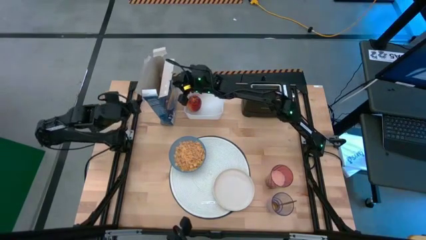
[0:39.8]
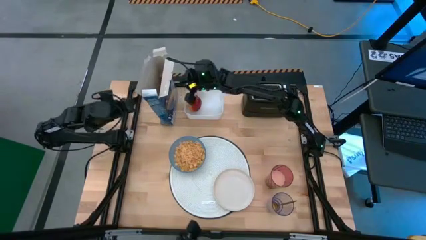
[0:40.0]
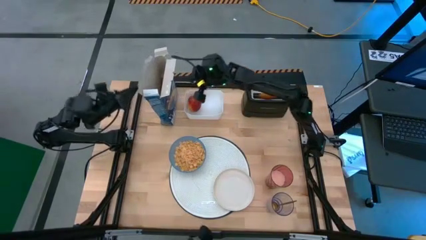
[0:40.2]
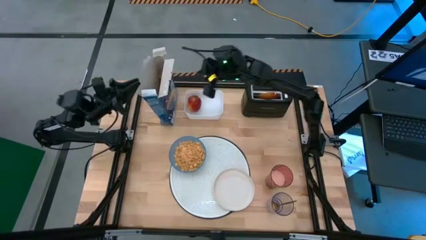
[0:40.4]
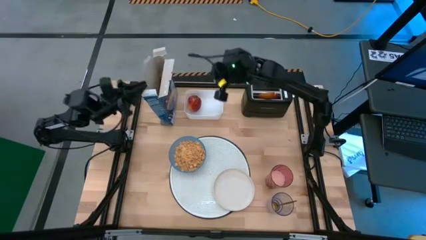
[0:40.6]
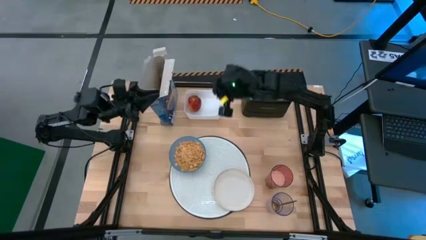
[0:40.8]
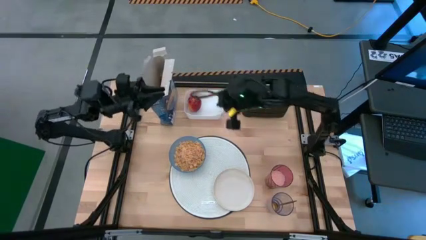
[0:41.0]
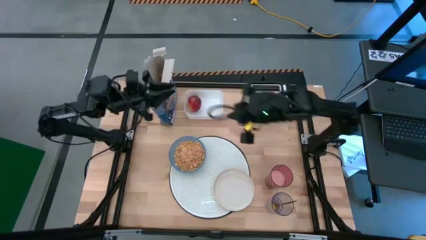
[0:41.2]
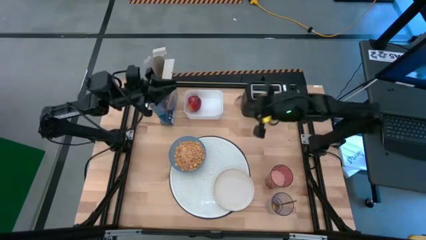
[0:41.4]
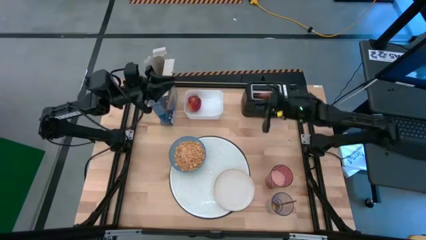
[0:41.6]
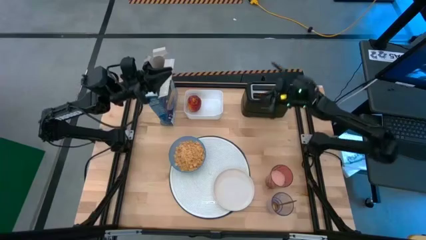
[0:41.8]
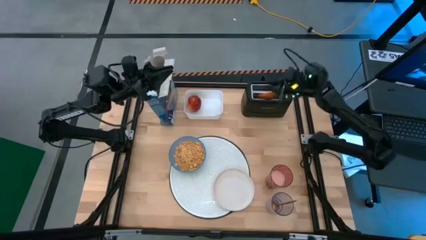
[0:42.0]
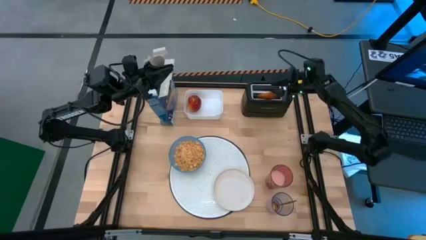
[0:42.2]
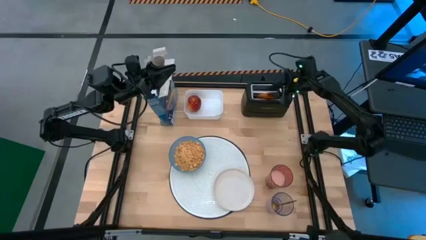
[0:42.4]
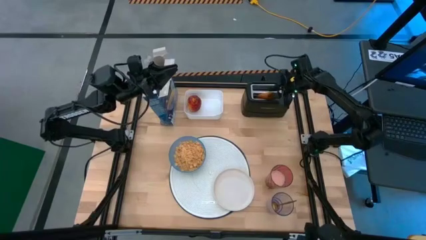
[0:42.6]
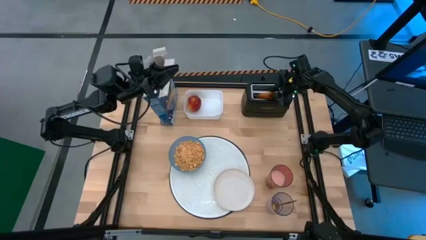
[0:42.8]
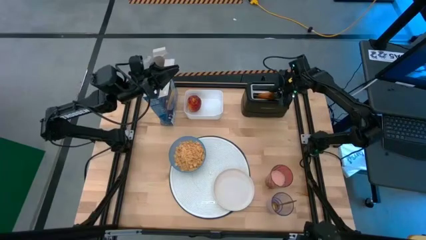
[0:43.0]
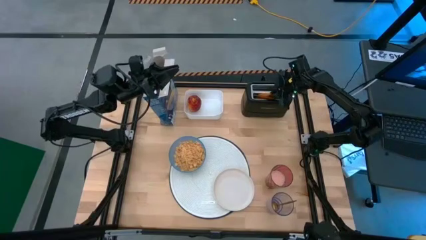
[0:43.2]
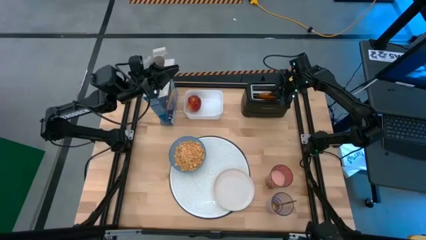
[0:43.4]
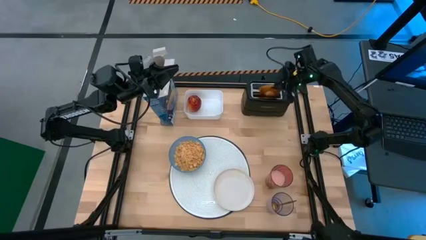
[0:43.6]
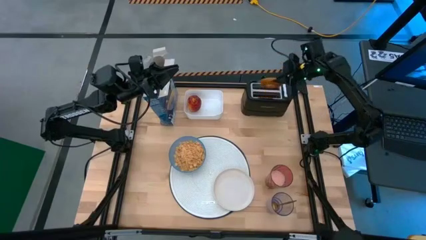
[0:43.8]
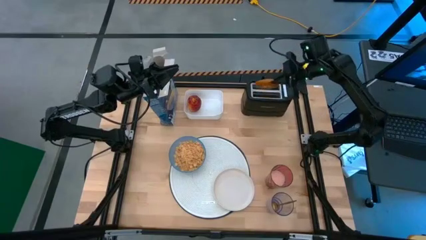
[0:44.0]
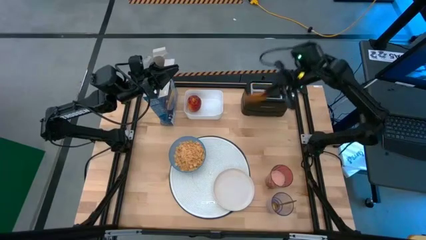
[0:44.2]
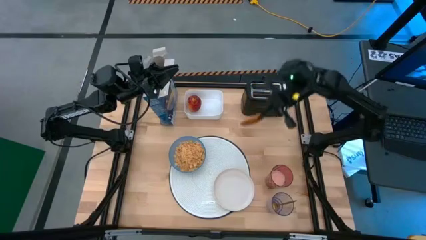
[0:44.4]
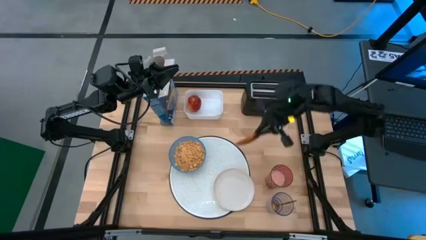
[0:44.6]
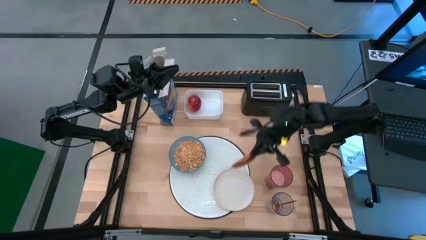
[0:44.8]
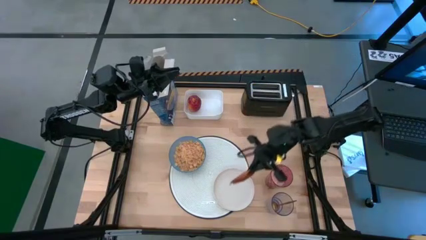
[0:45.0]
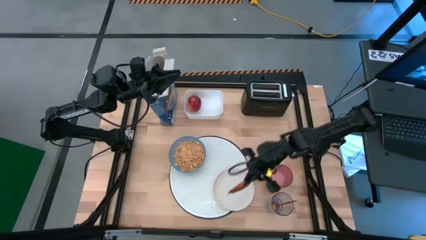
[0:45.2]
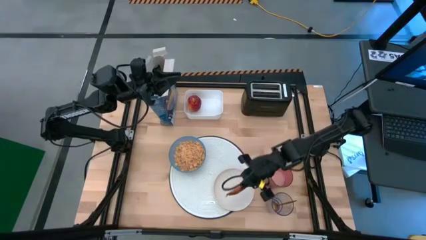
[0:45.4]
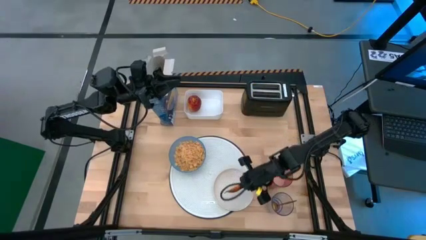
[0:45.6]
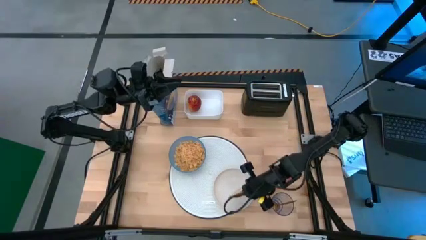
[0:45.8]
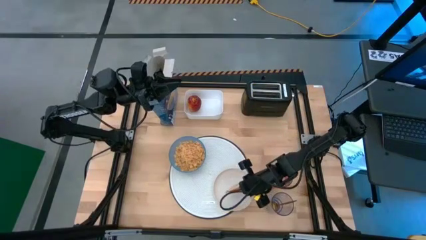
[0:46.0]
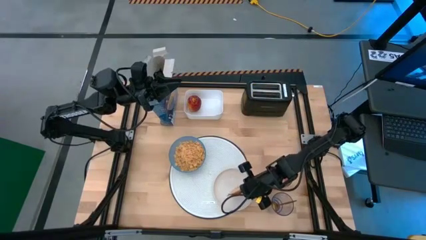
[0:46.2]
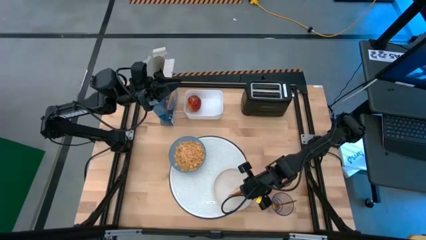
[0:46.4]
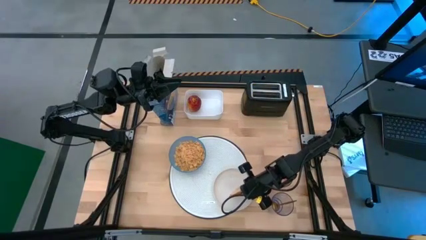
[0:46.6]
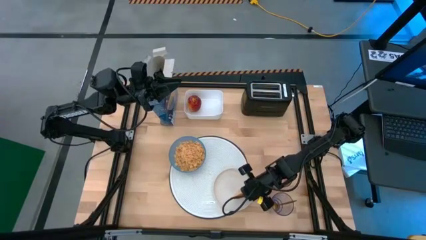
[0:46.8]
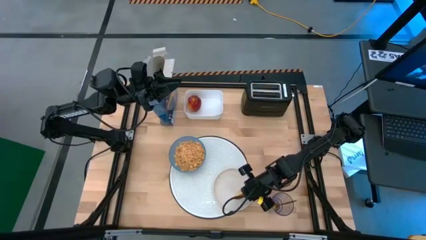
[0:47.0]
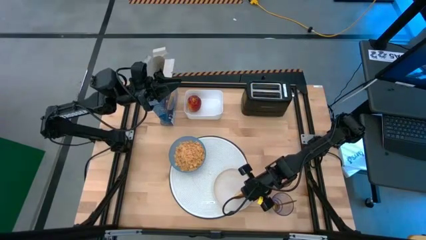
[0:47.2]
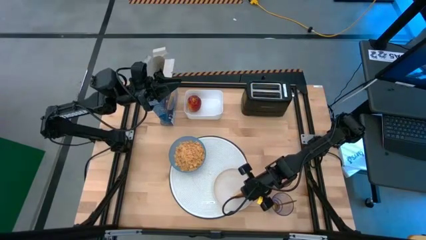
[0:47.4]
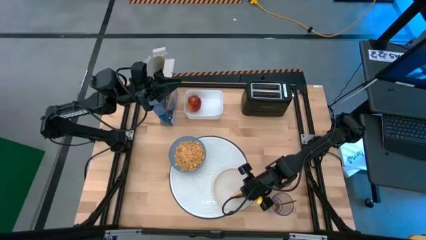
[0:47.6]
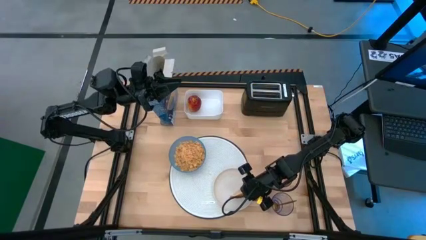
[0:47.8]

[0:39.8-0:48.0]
Task: Arrange a breakfast setting
Put the bagel on the white plate

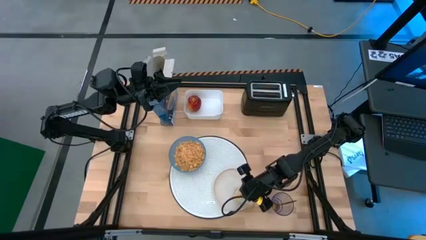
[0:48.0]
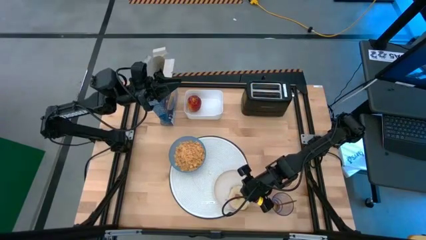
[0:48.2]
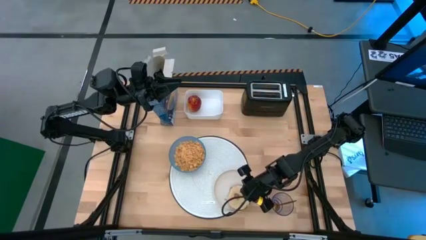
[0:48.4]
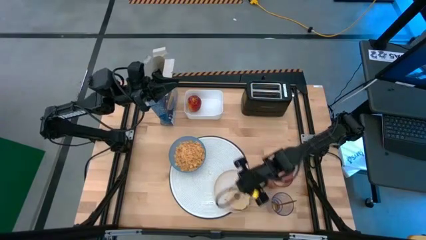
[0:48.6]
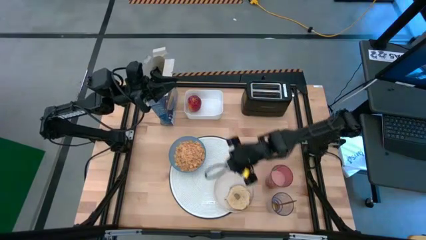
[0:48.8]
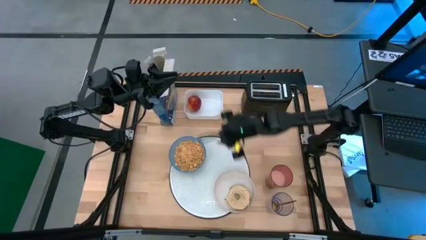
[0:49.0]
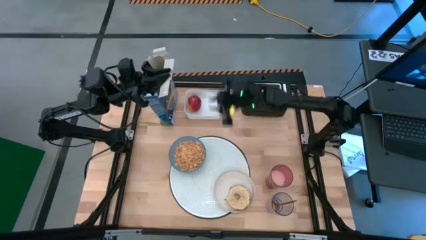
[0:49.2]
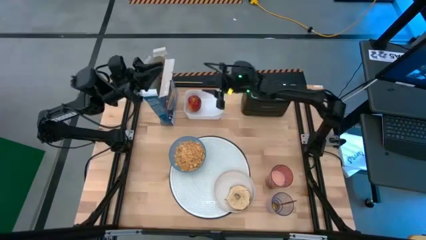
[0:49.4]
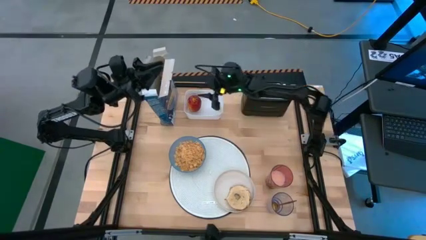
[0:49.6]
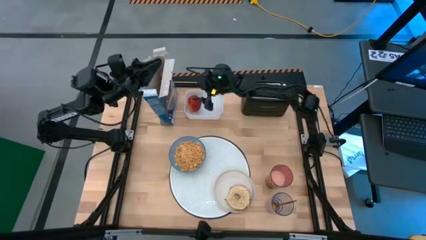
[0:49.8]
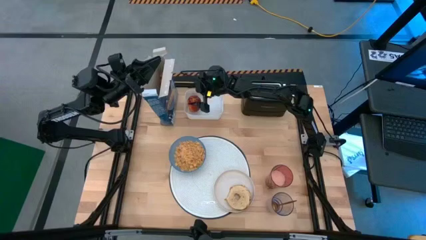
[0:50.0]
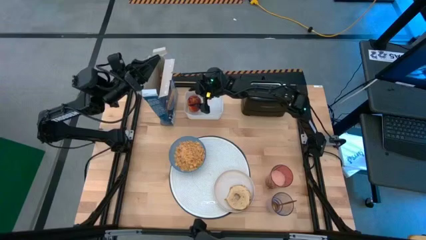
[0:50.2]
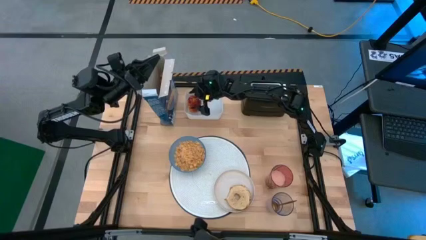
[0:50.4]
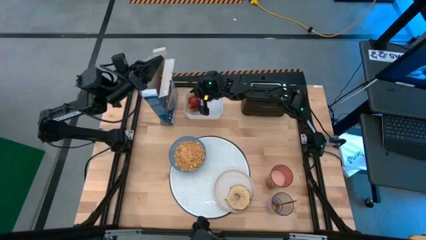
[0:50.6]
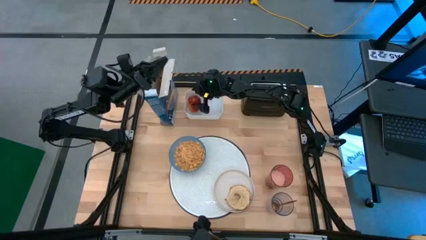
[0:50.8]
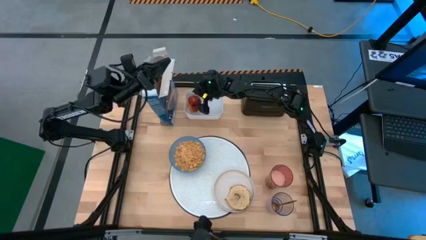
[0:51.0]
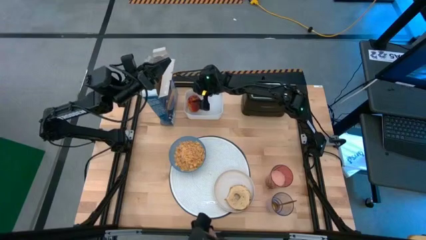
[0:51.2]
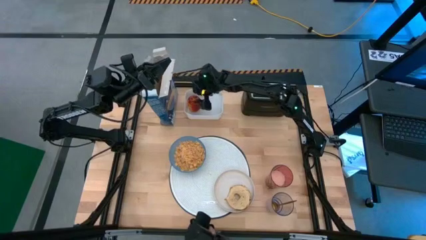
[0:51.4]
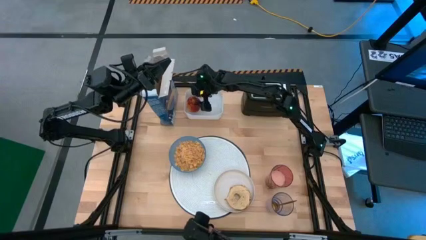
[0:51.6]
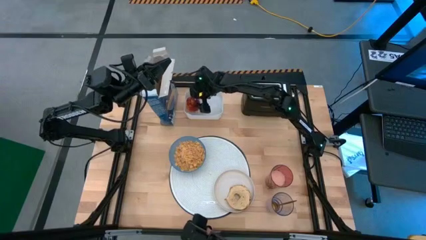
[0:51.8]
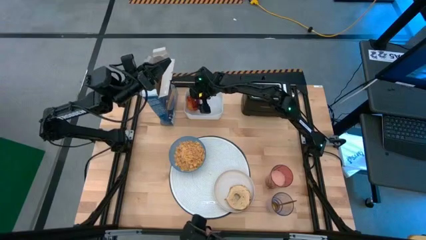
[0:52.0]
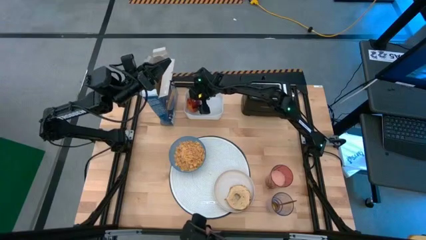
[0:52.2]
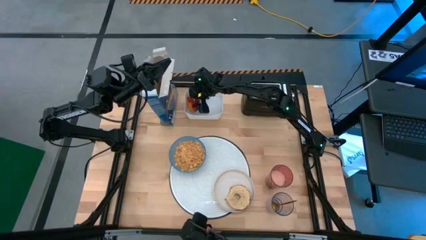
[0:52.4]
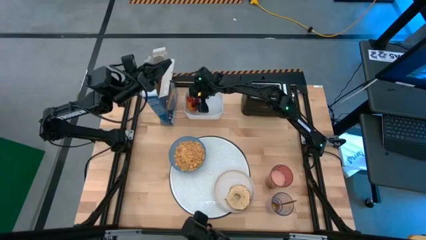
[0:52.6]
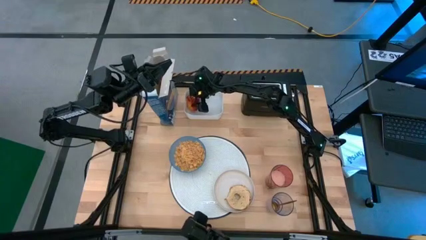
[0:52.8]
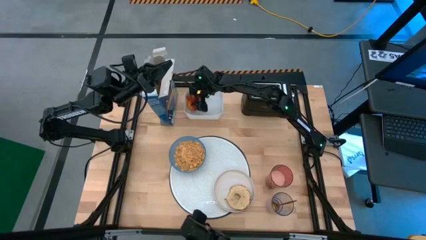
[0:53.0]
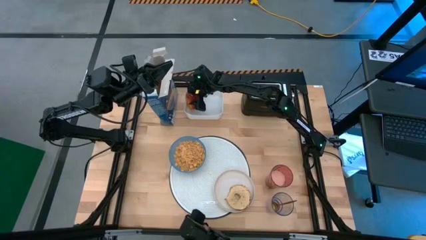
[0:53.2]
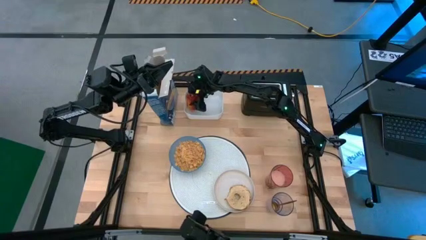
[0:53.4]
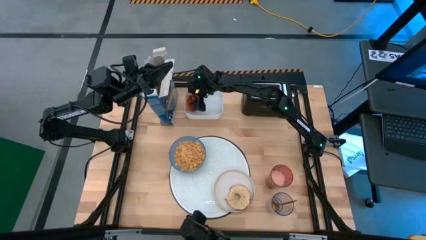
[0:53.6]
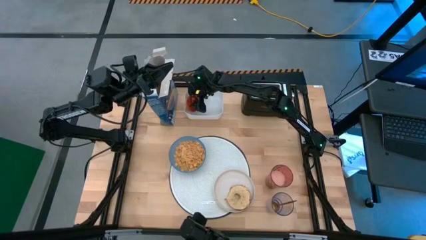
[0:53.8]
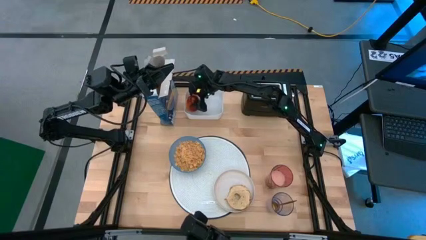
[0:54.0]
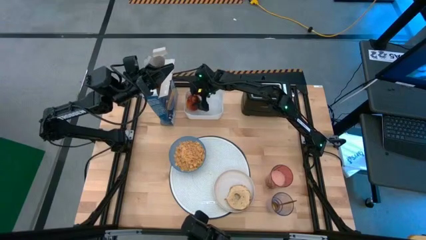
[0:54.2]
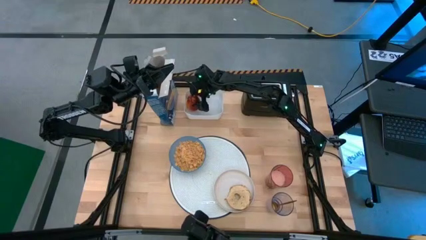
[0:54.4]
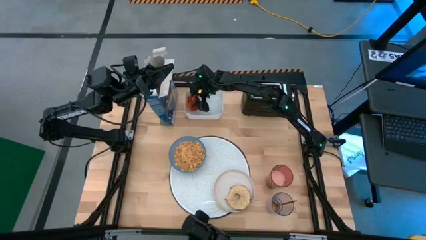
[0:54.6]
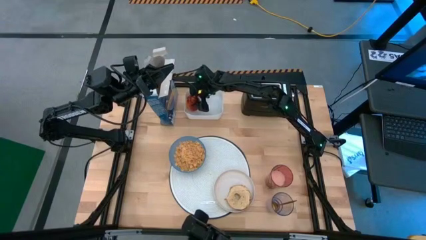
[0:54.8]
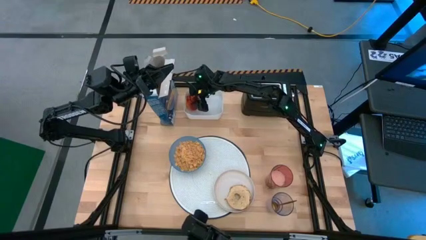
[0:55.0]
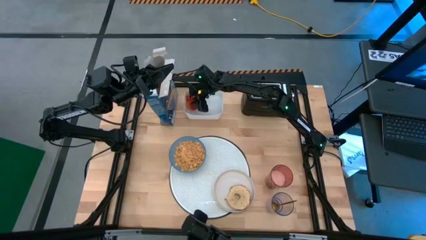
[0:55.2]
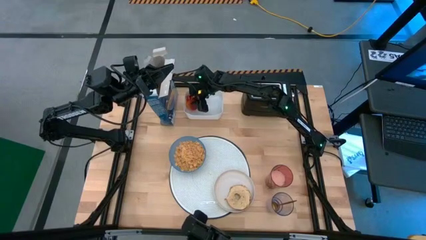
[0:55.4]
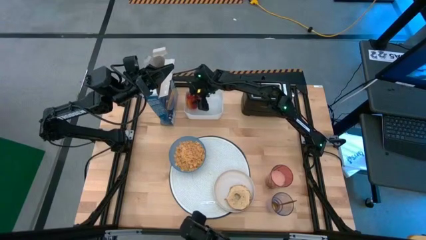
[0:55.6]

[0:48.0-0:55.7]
Put the apple on the white plate
